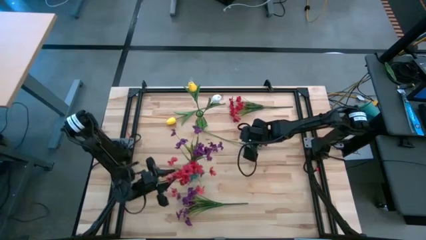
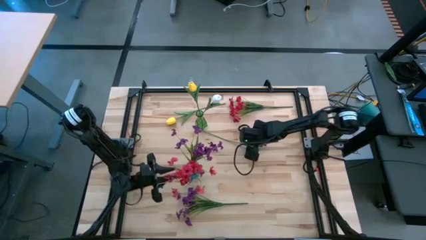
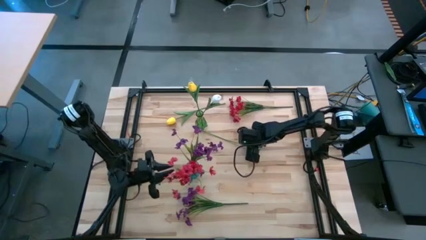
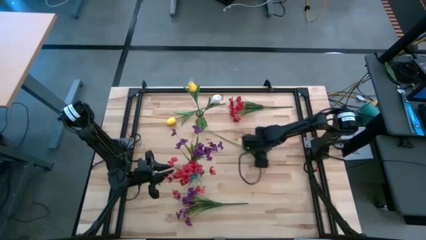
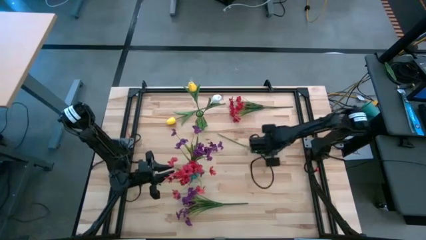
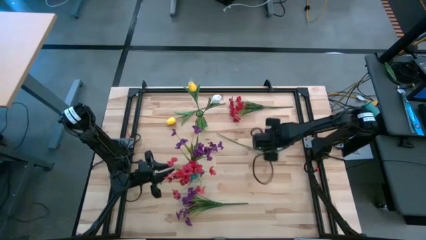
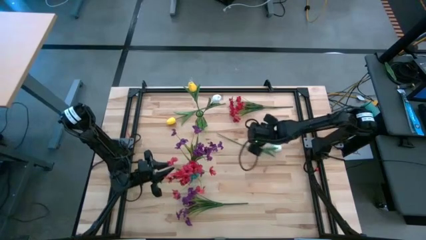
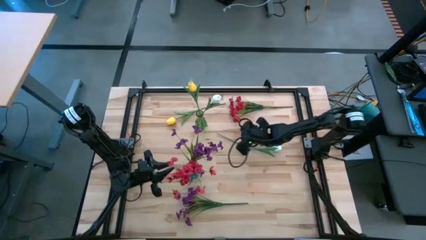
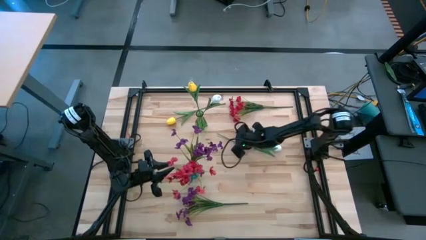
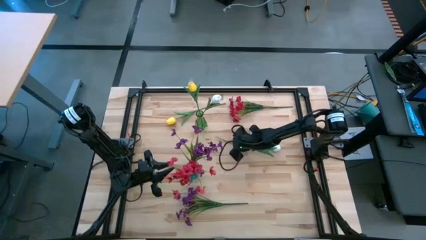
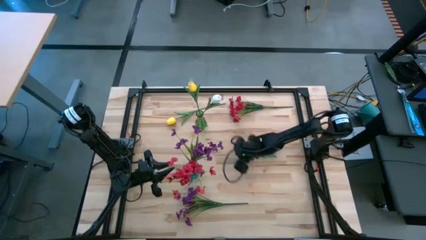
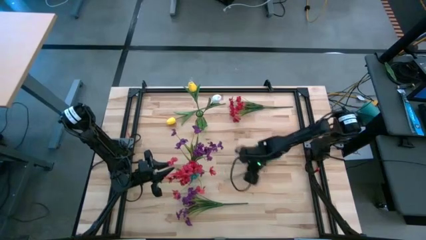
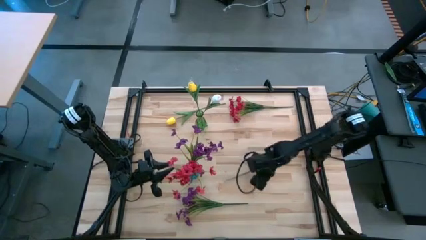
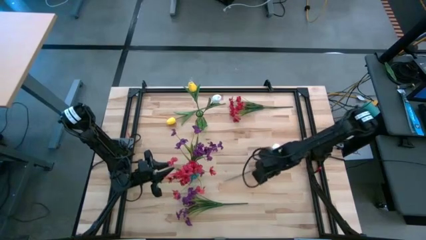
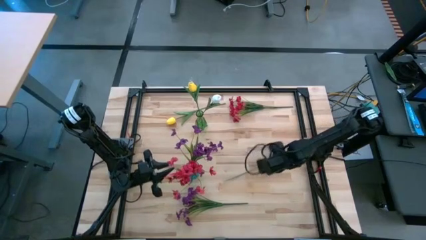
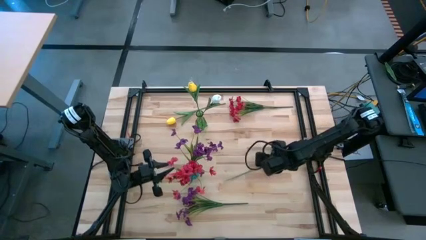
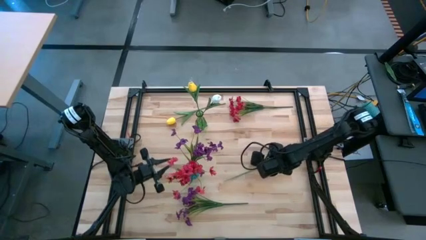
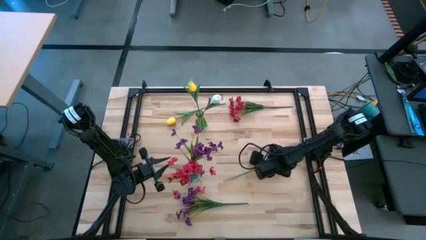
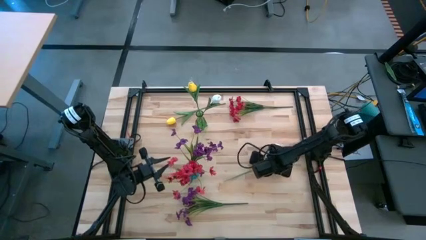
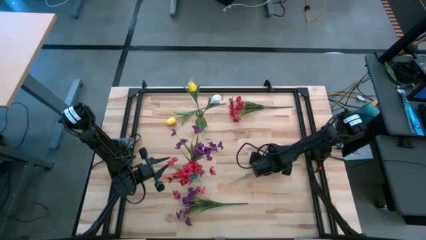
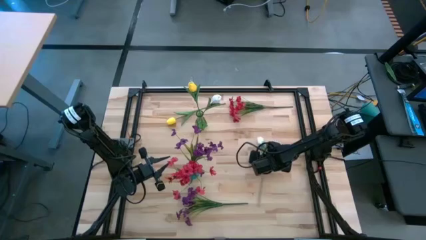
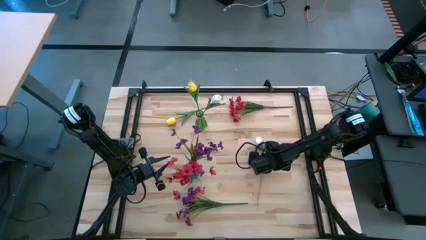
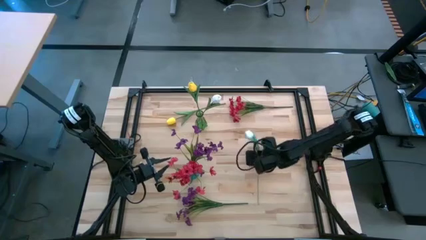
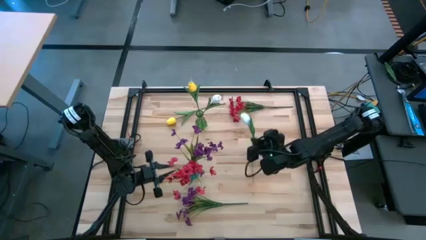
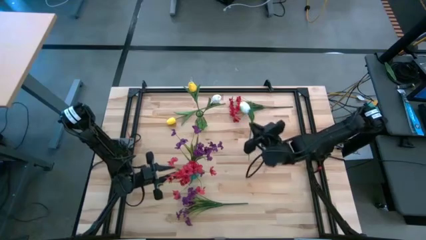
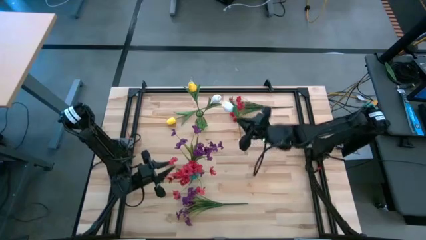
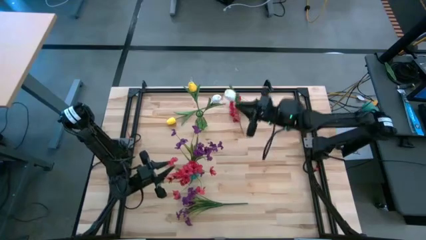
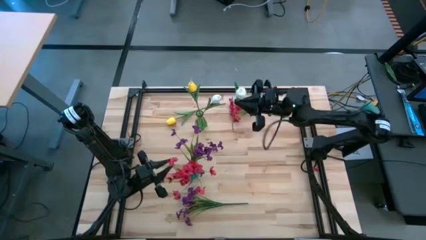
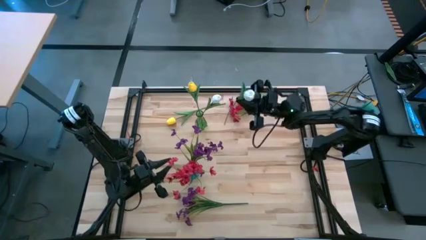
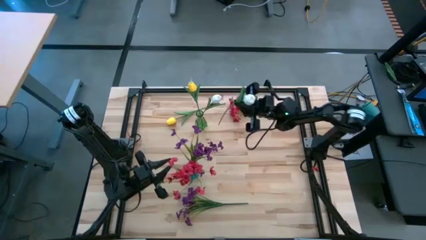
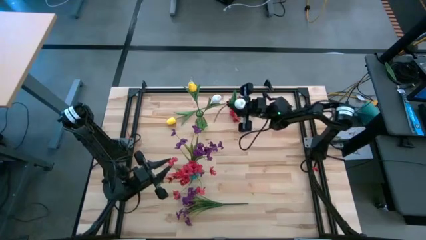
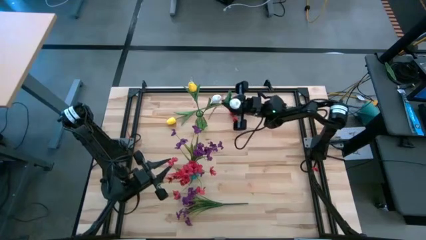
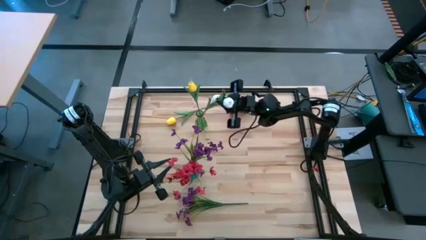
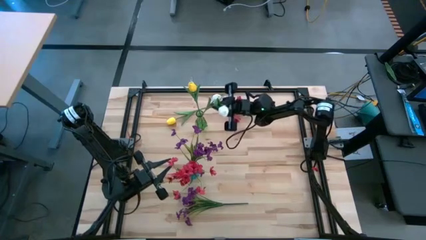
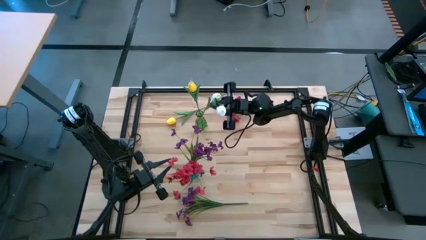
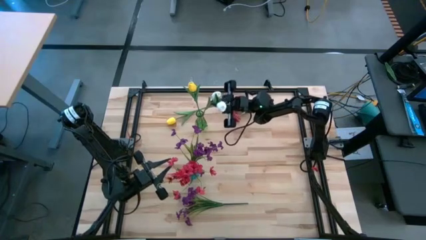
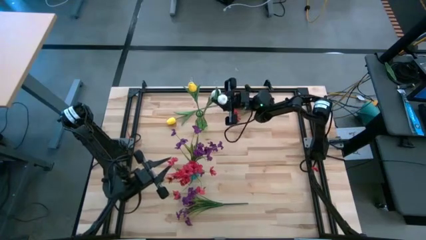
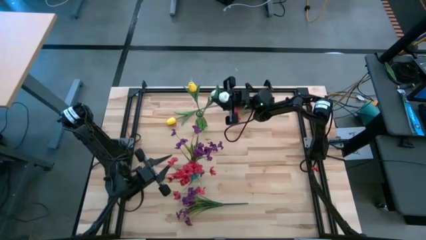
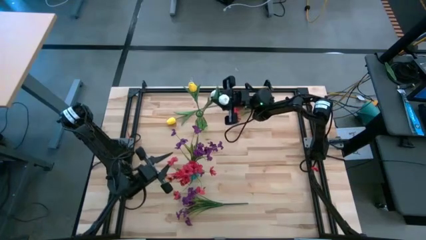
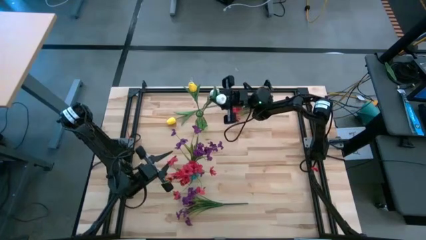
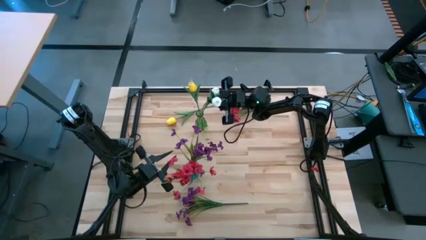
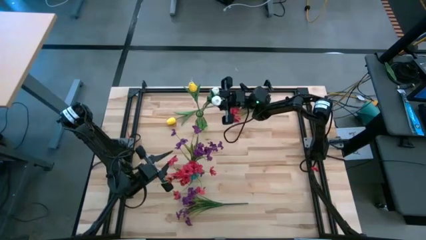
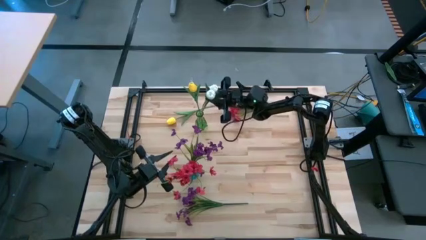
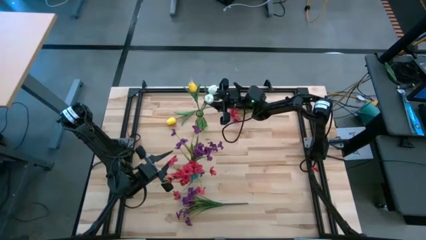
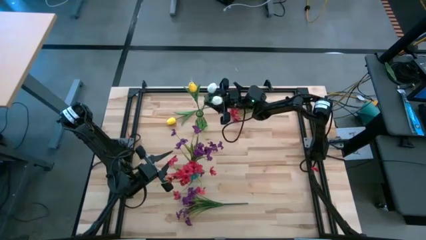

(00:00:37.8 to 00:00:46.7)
Task: Sort flowers into vase by color
Put the bottom white flower into the green vase

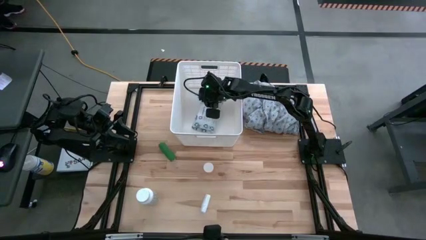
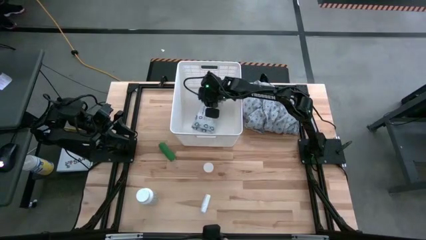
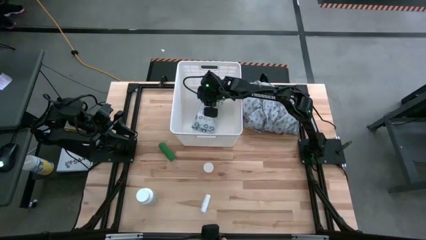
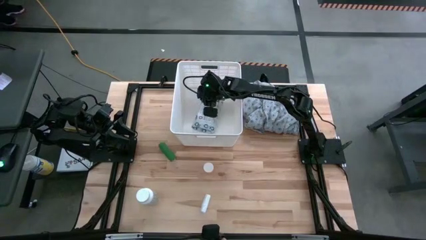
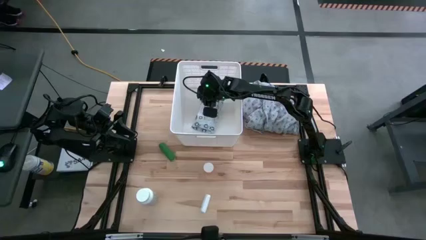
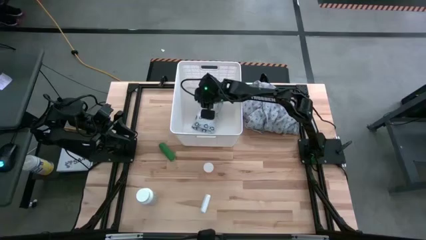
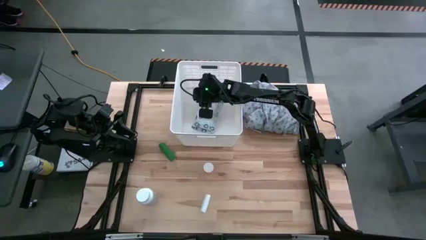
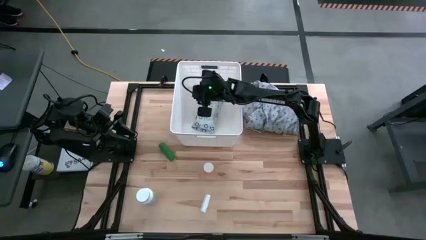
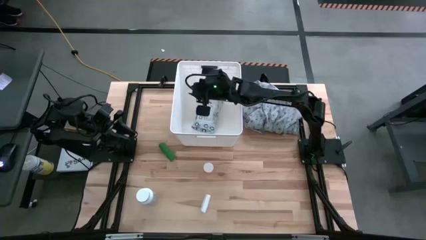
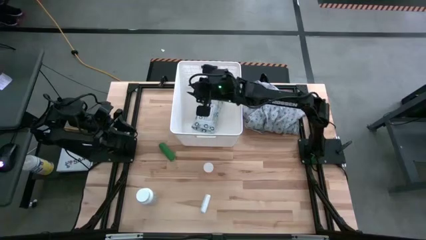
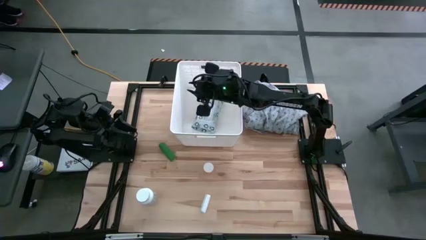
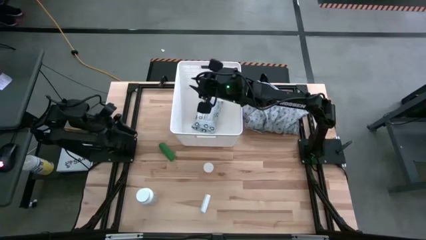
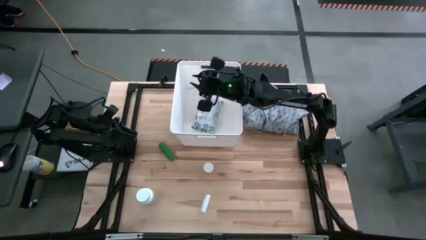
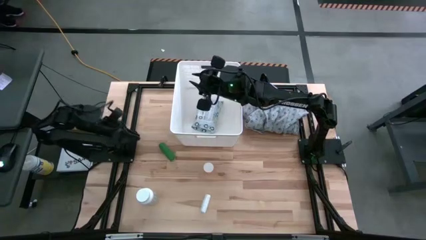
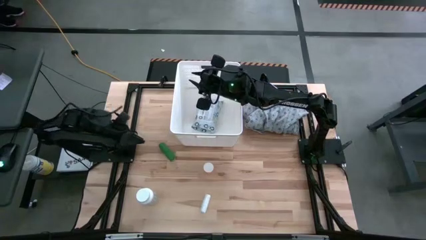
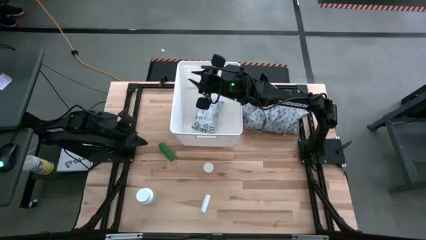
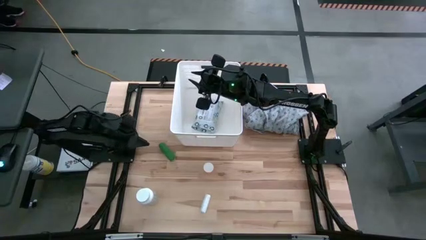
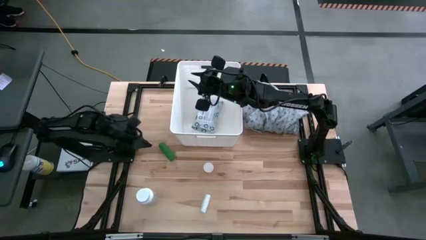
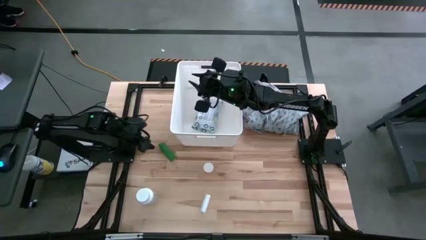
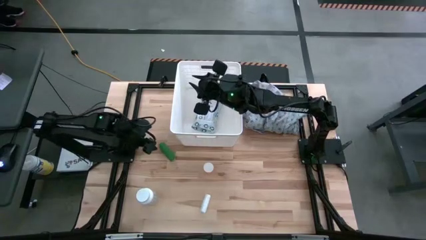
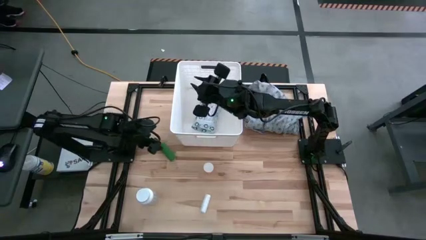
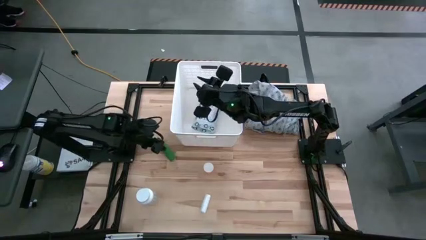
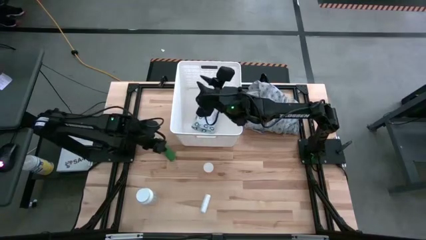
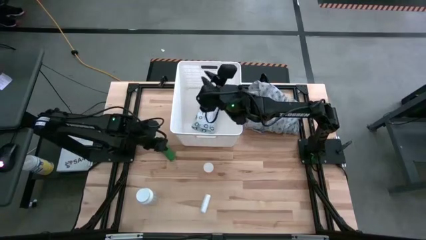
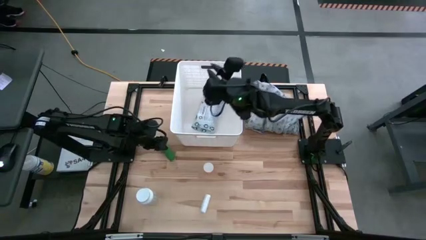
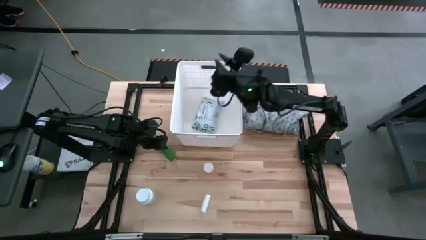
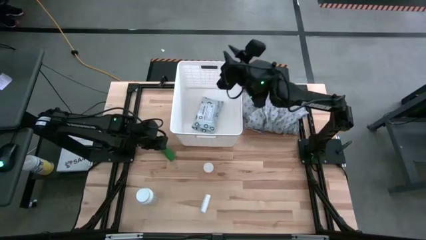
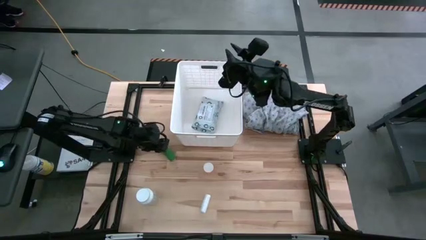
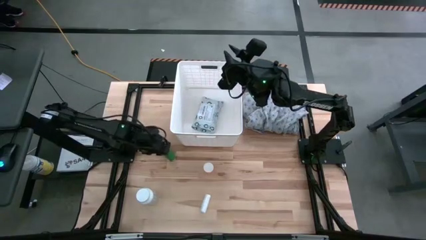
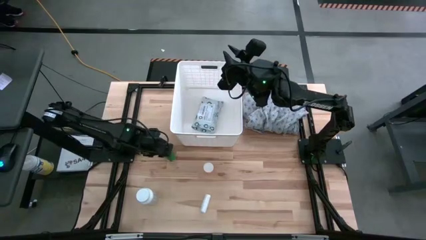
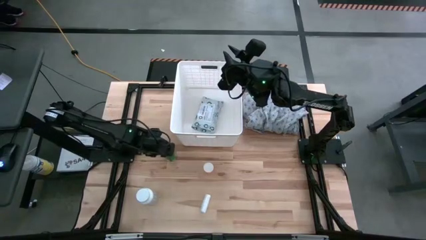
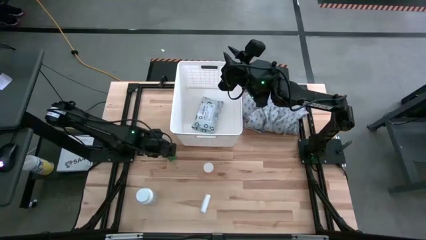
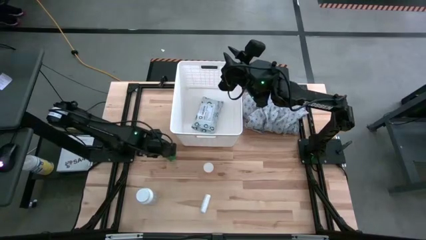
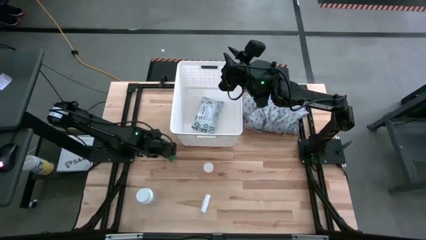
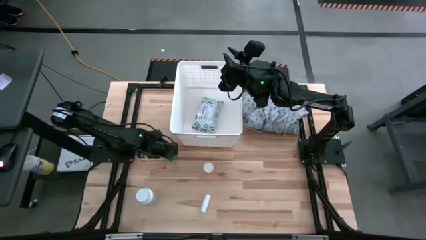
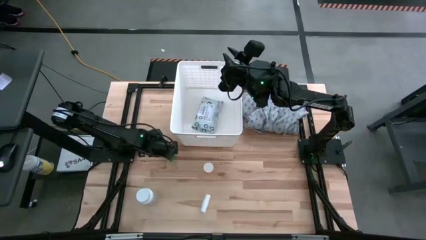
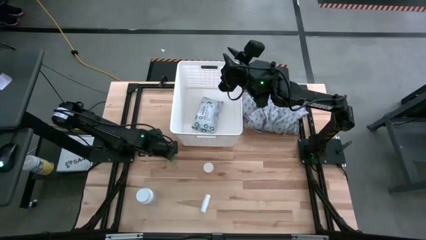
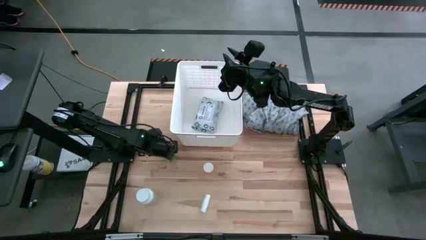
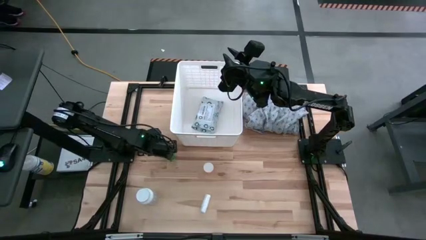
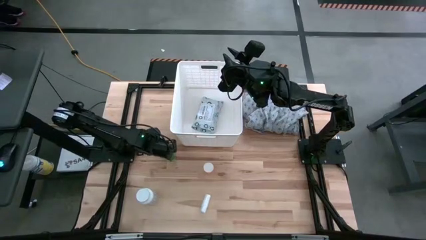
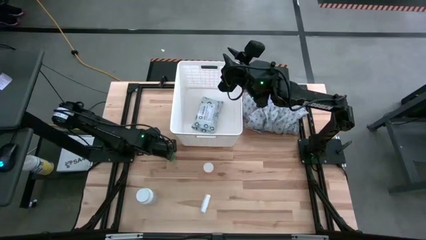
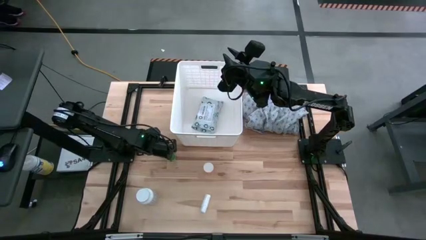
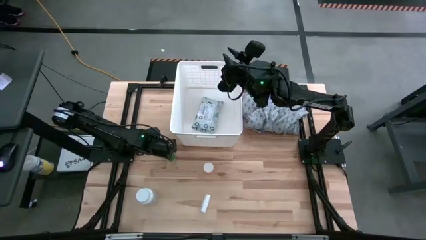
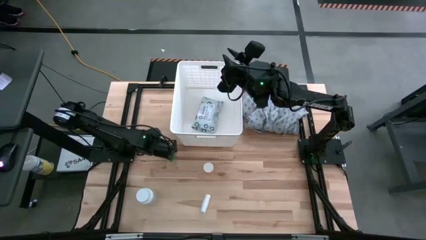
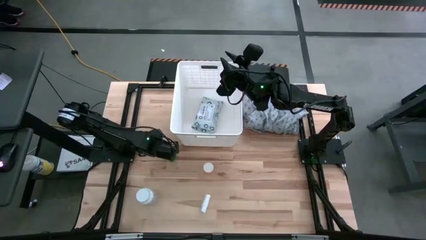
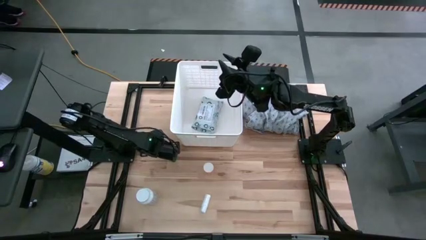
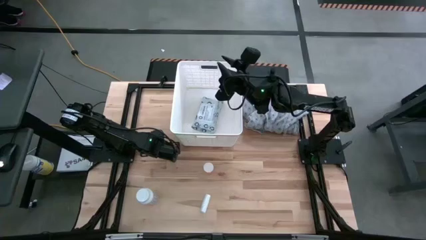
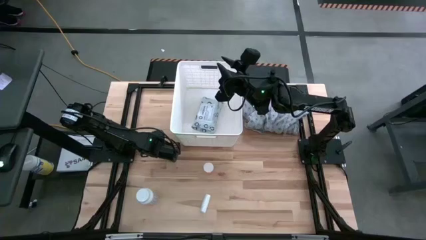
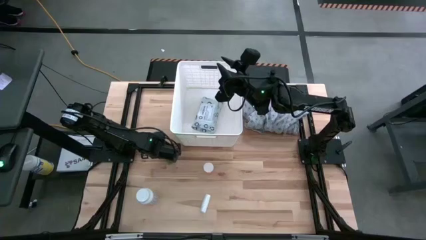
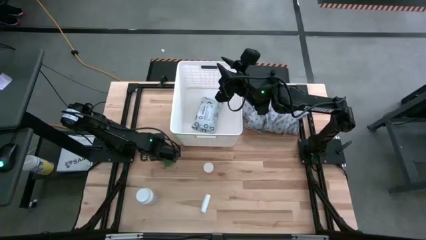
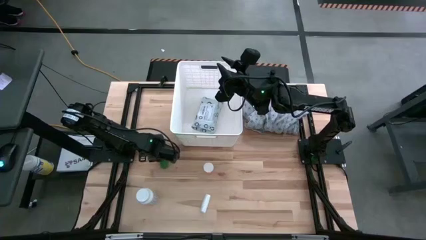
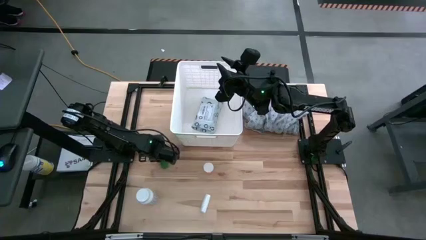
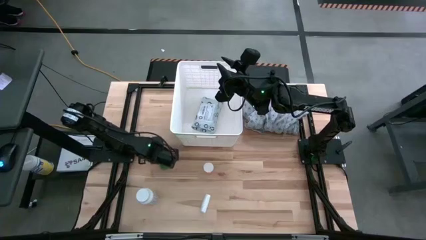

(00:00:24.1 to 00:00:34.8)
Task: Pick & place medical supplies in basket/bin
Put the green bandage into the white laundry organizer
